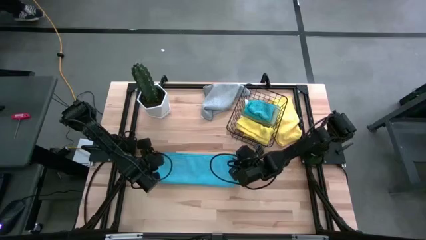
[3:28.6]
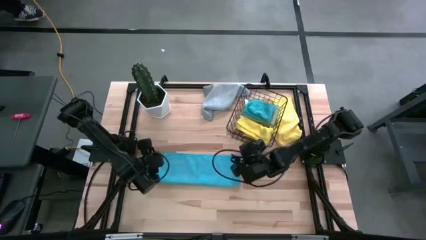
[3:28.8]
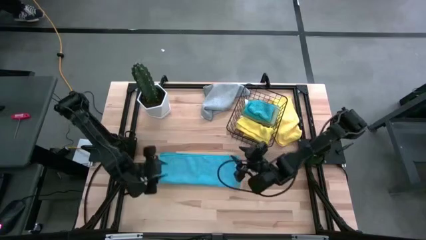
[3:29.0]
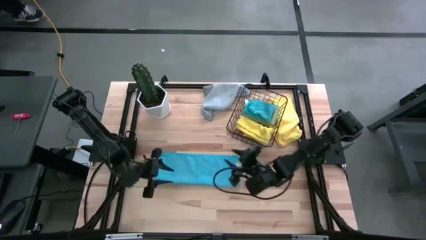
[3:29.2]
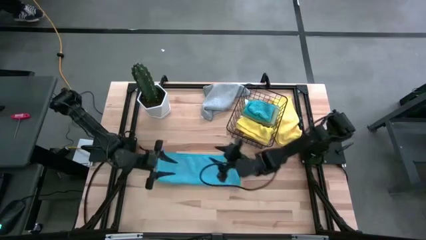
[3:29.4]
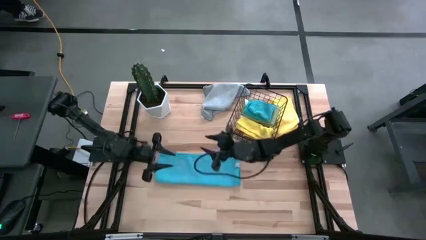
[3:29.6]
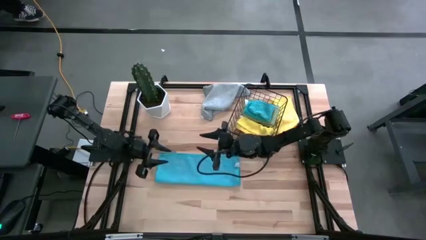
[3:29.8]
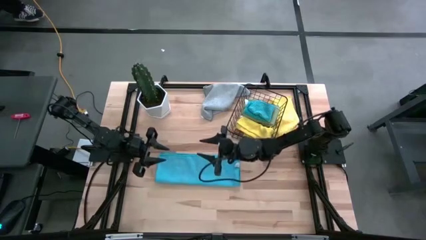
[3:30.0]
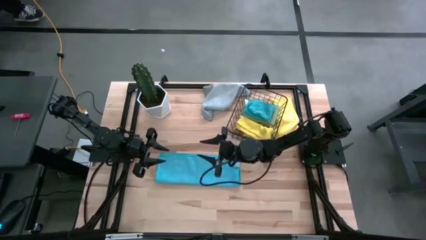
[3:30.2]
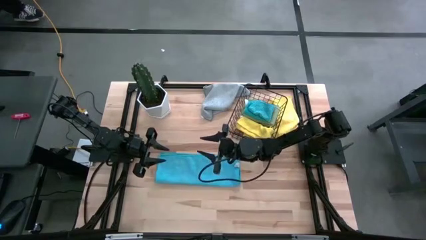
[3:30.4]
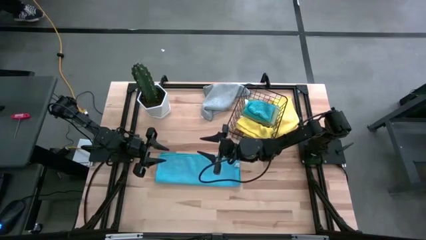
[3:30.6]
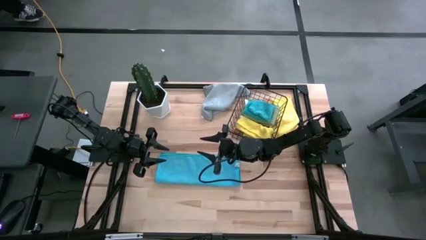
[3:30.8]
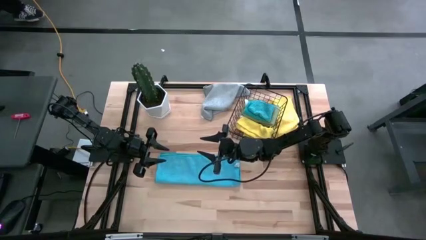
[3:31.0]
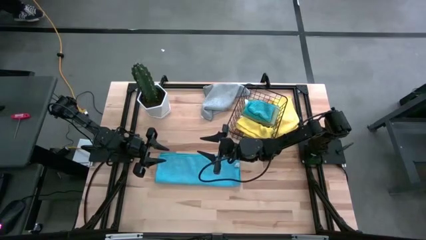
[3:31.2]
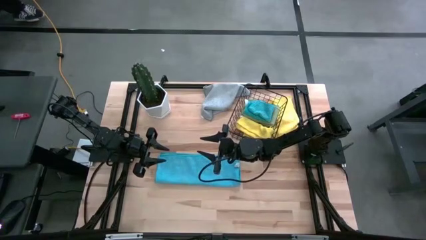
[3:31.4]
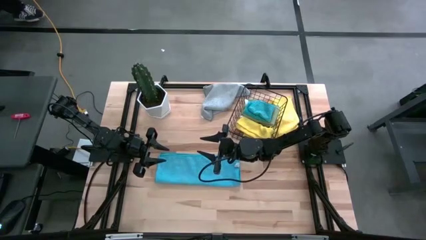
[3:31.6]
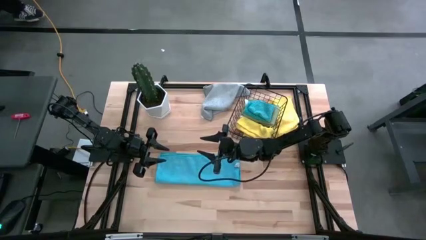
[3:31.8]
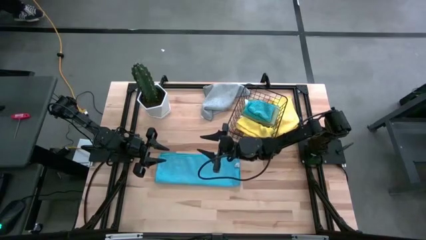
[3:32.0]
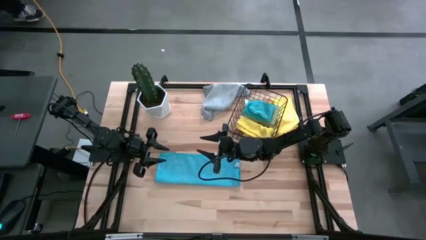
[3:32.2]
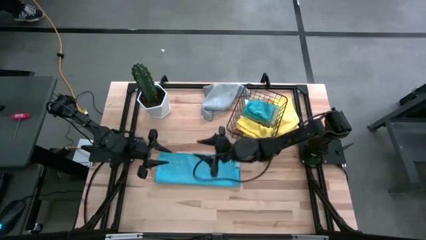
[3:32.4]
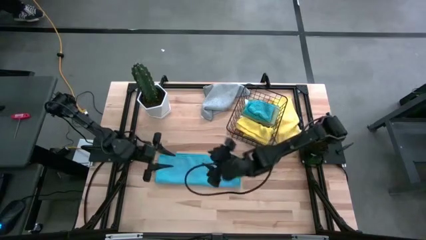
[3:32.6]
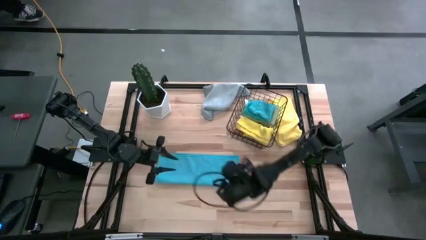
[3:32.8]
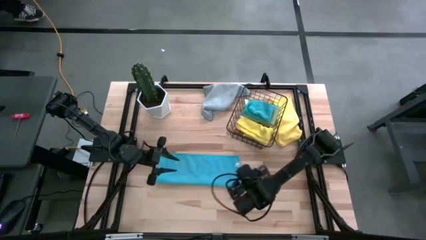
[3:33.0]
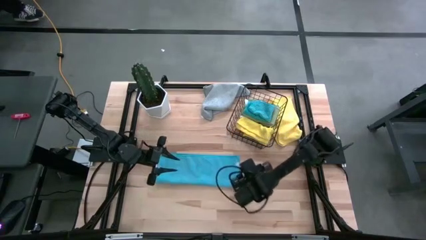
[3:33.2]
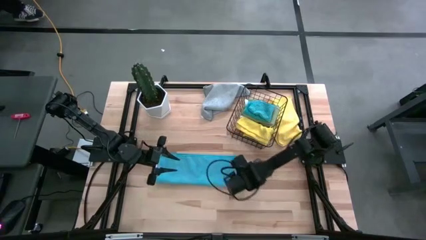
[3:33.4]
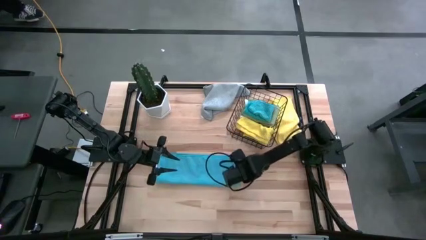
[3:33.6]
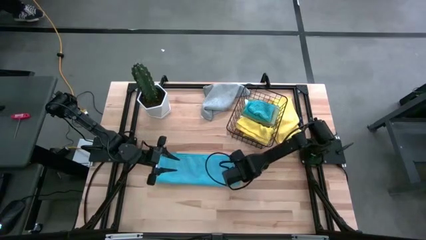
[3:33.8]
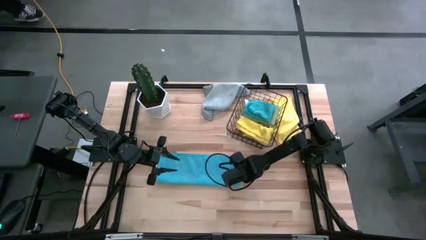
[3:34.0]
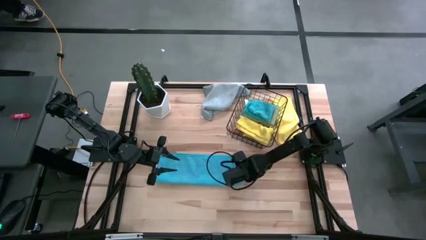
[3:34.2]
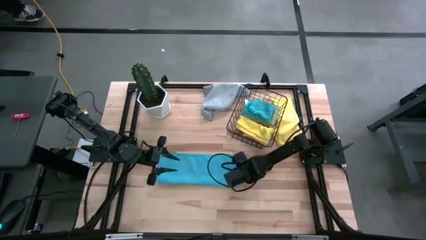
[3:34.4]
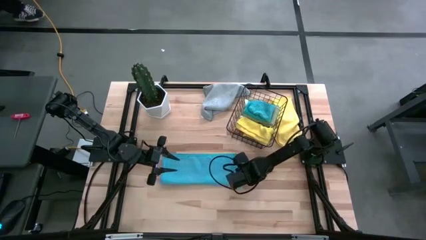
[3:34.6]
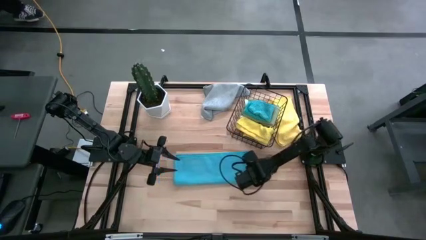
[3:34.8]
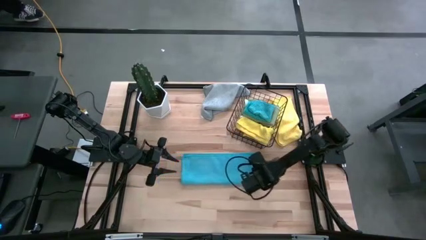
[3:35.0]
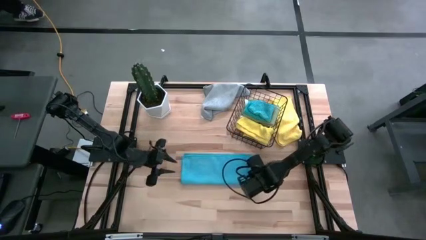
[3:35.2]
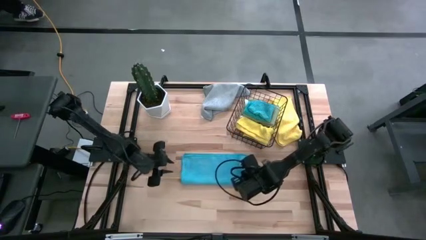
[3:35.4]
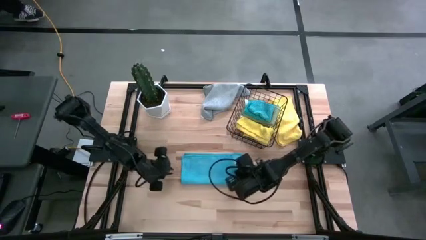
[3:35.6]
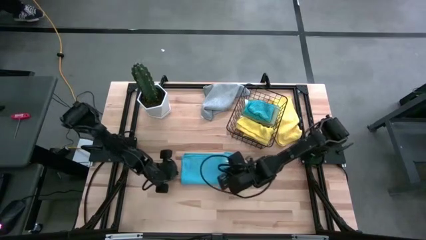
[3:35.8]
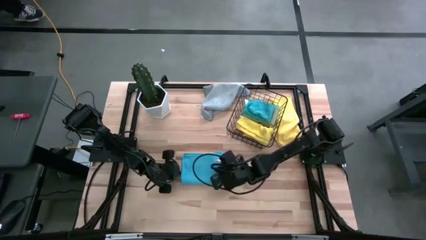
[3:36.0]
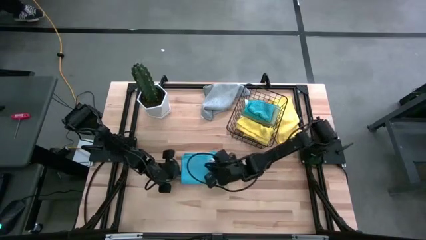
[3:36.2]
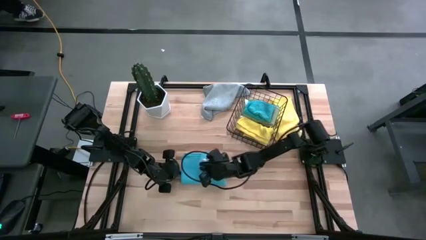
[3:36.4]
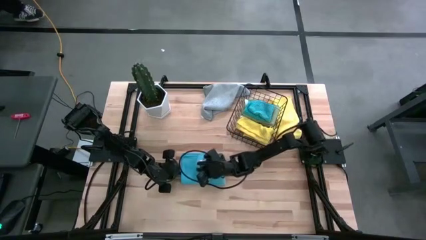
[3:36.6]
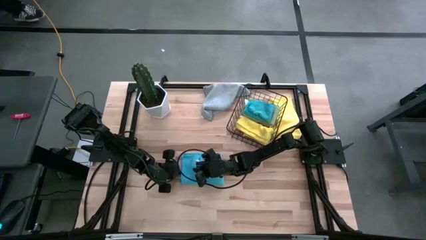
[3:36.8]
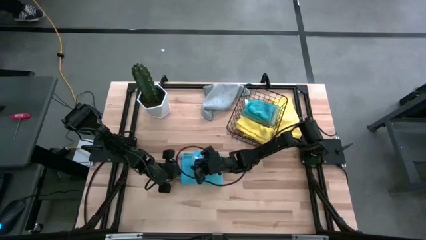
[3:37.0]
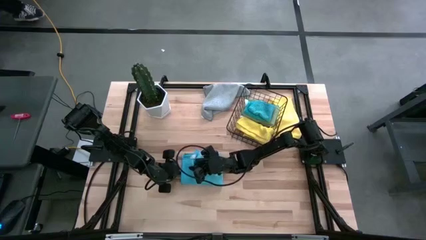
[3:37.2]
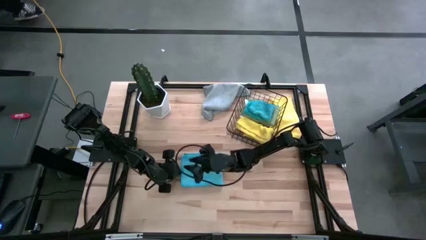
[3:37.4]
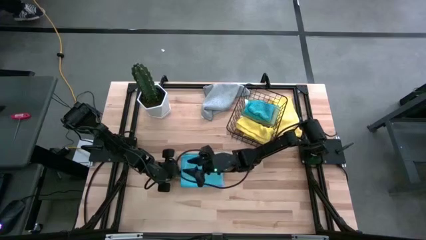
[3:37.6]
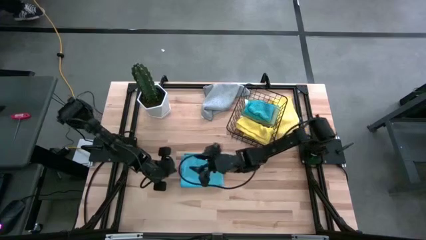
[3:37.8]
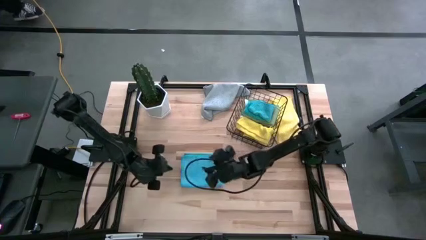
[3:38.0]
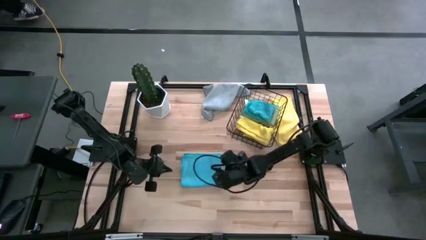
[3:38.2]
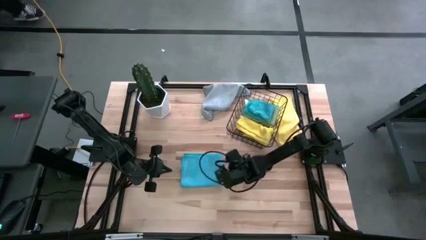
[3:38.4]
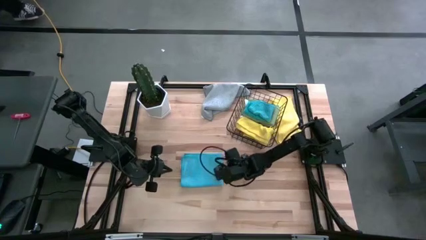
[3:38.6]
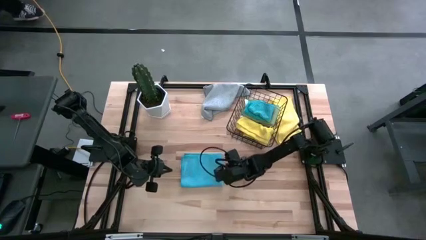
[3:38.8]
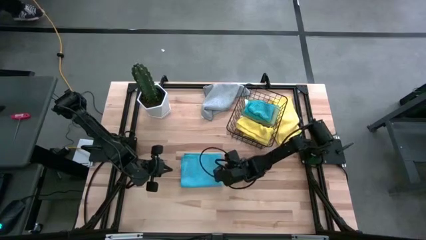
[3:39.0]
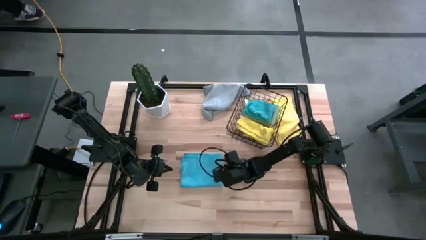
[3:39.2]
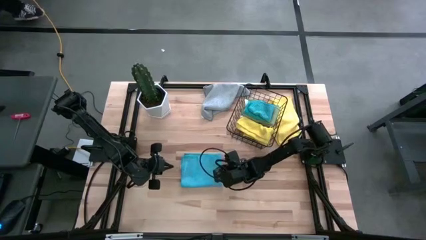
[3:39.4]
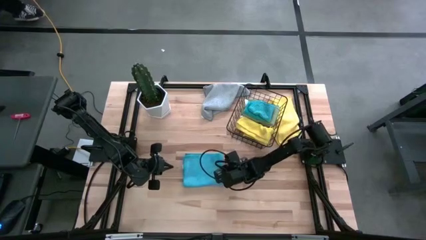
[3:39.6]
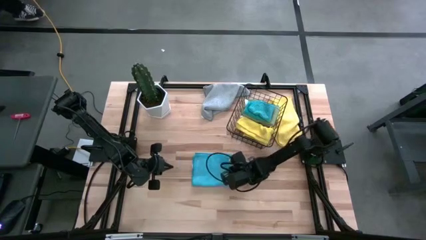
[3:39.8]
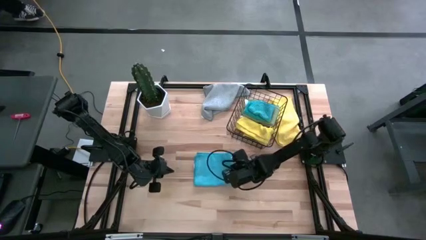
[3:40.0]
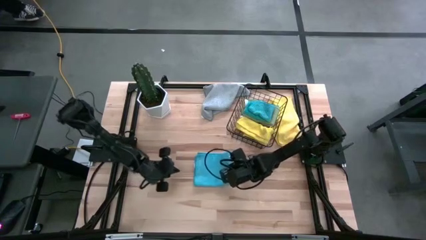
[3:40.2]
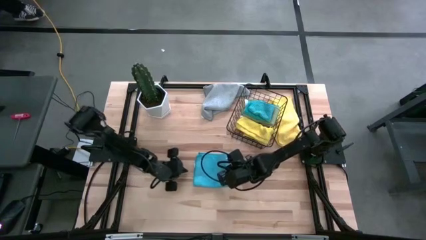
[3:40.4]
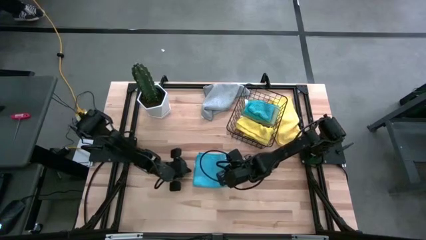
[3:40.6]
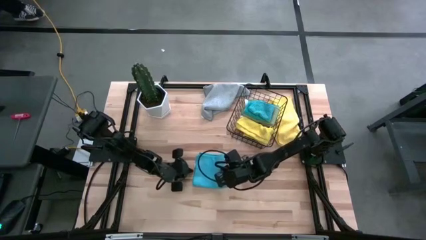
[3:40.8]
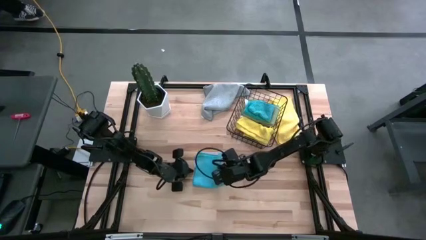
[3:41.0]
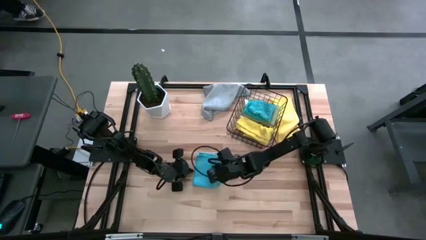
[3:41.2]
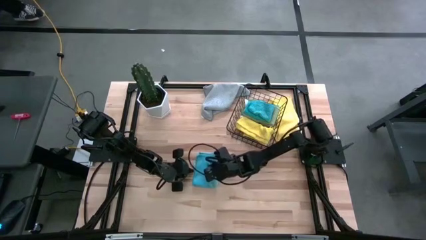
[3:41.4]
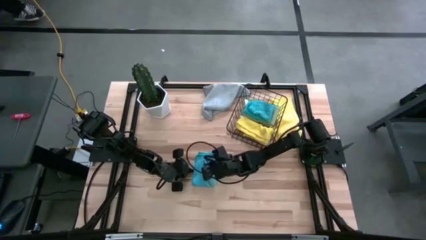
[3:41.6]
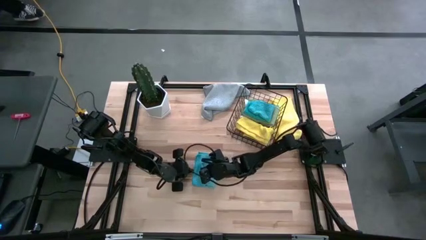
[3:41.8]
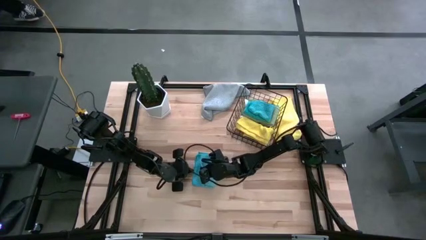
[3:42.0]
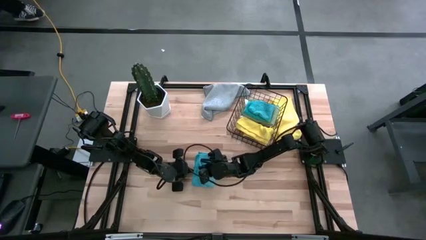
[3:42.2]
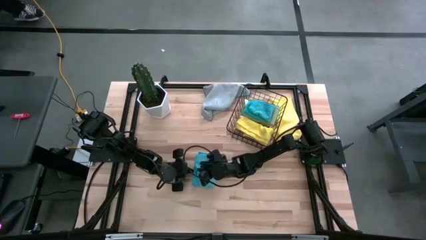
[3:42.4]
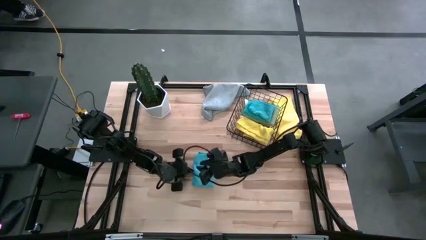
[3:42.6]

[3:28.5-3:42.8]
Task: Fold microfiber towels
Fold the blue microfiber towel

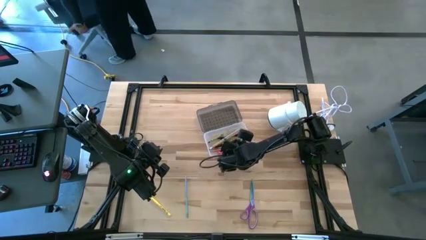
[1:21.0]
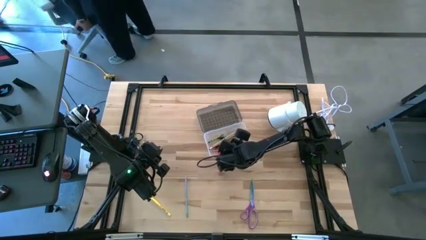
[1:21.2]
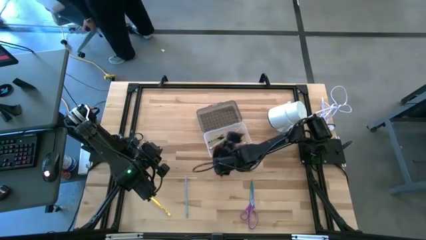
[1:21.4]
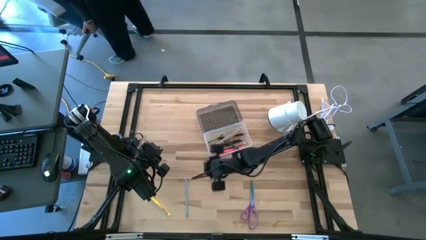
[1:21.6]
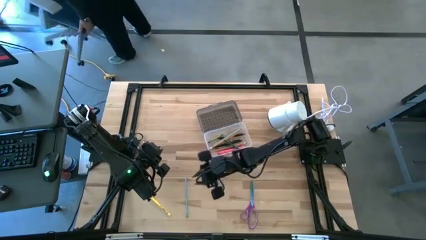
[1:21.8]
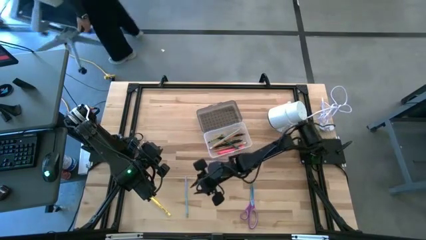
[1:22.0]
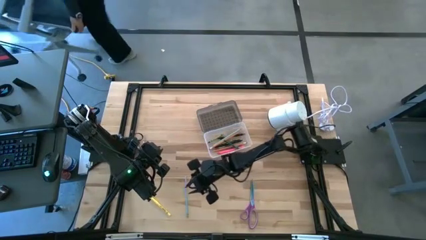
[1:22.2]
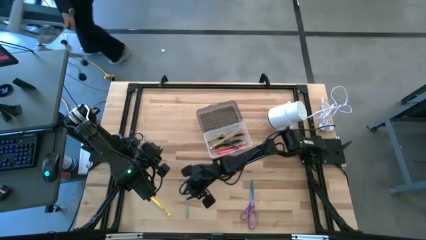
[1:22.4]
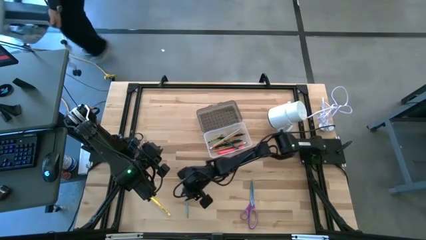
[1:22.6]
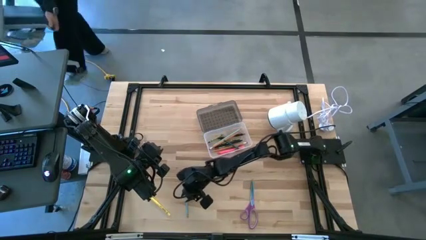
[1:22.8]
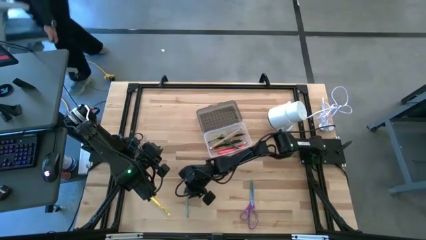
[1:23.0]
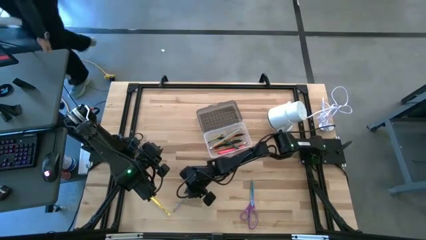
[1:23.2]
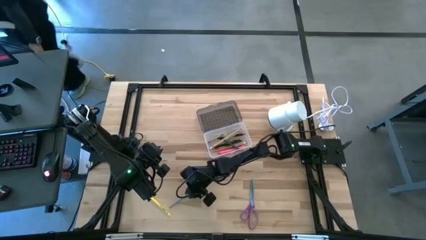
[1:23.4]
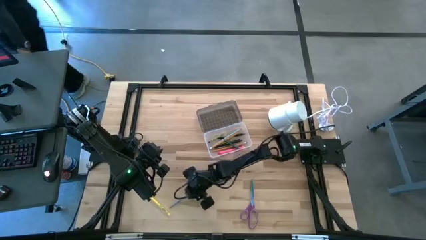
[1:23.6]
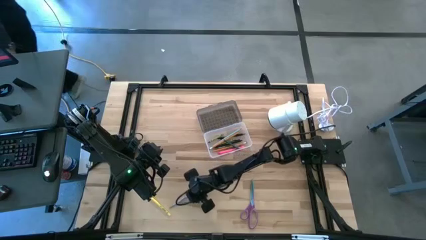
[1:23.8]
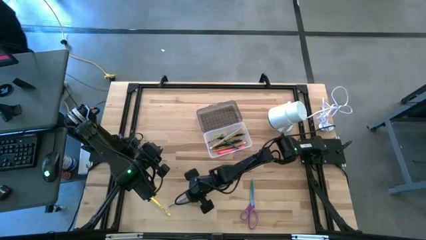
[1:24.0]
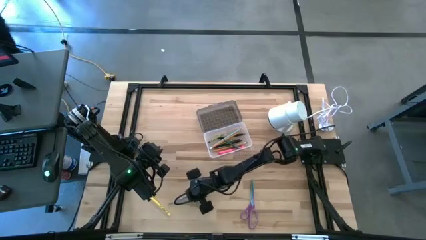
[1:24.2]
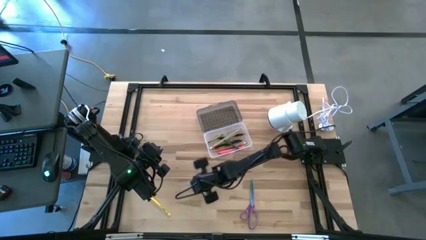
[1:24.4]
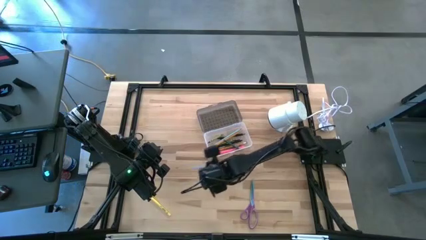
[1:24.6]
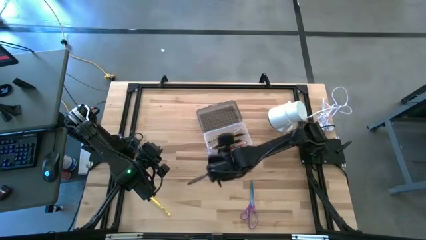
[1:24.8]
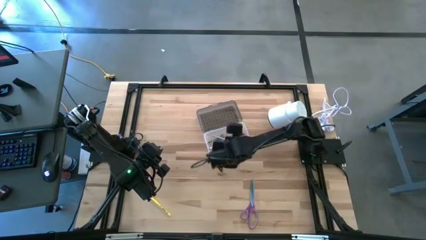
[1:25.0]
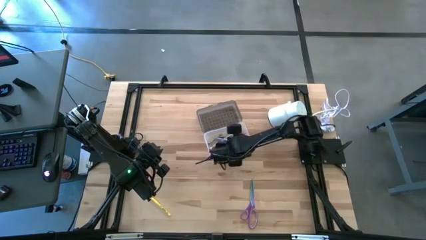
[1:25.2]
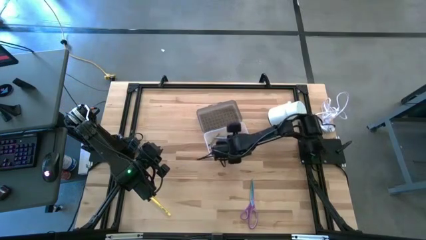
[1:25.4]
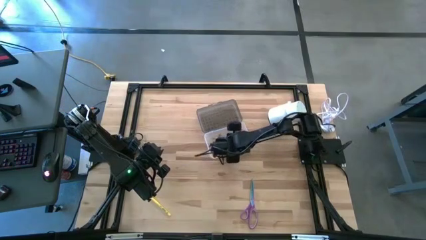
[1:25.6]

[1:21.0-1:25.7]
Task: Pick & place school supplies into a supply box
Put the blue pencil into the gray supply box
